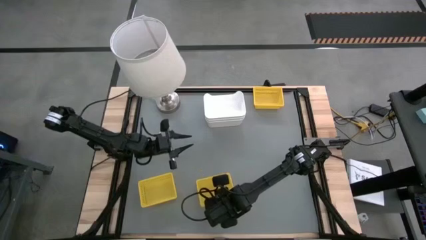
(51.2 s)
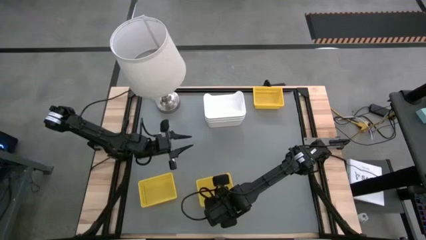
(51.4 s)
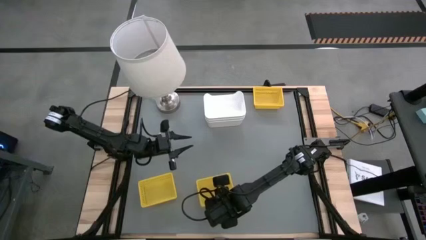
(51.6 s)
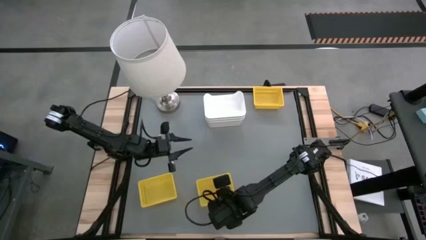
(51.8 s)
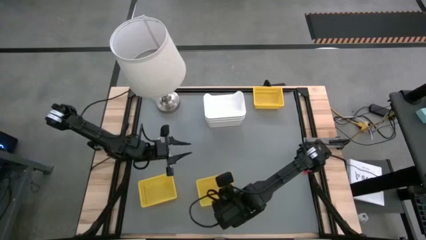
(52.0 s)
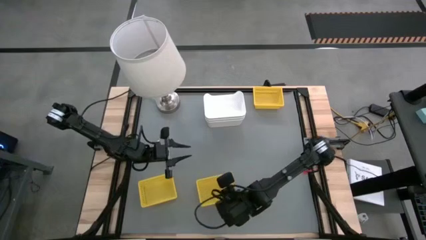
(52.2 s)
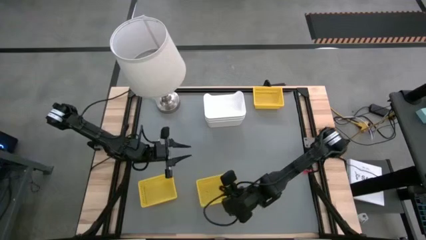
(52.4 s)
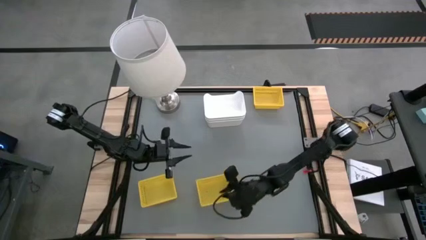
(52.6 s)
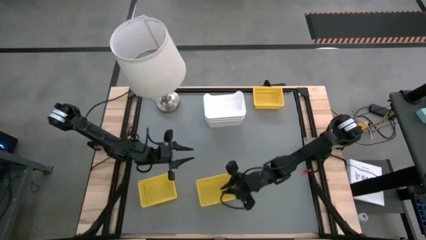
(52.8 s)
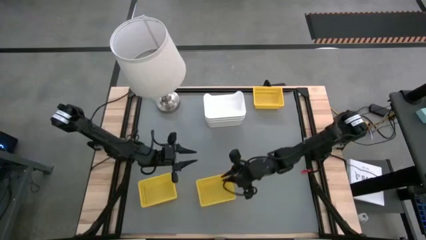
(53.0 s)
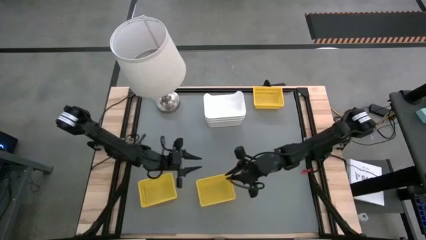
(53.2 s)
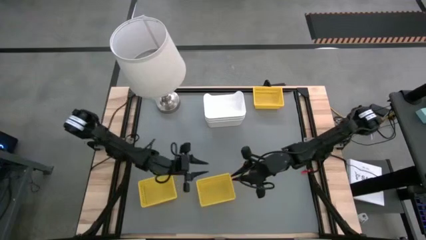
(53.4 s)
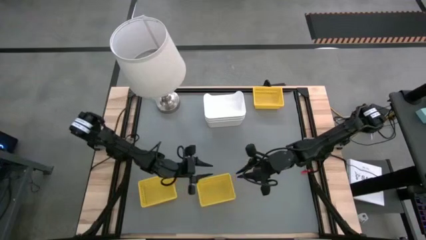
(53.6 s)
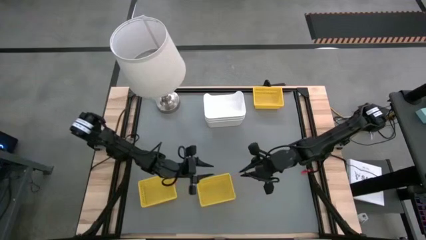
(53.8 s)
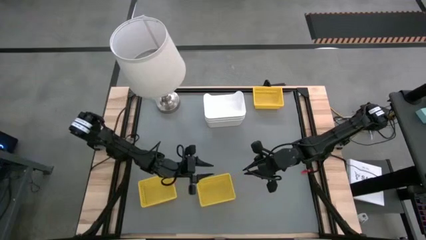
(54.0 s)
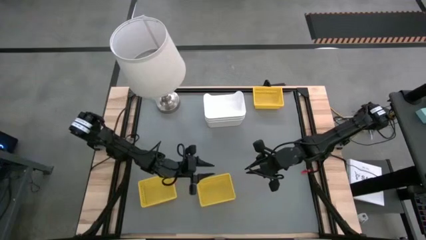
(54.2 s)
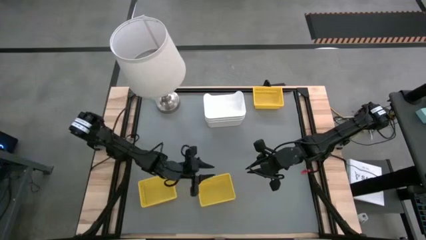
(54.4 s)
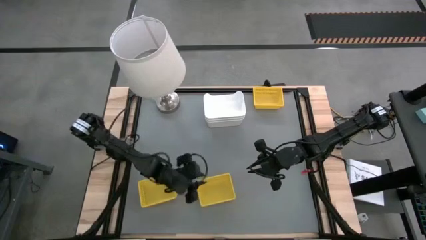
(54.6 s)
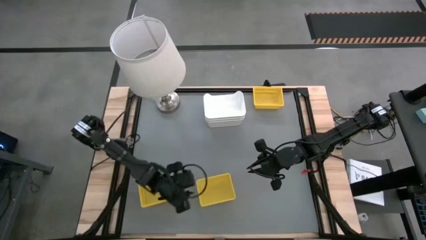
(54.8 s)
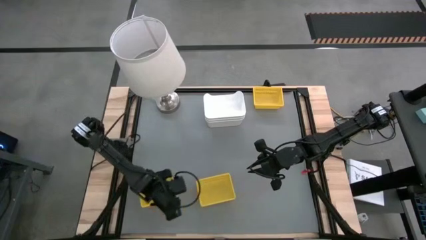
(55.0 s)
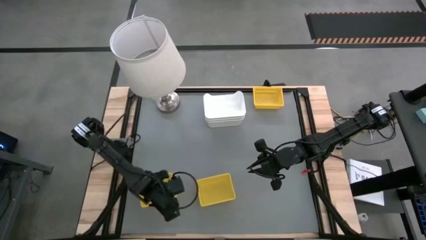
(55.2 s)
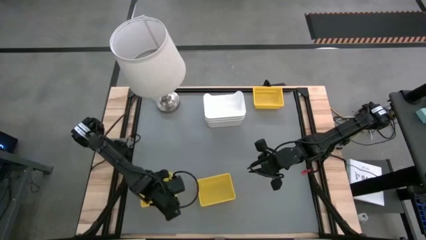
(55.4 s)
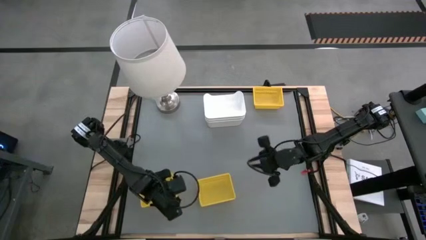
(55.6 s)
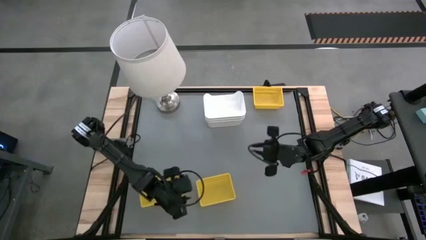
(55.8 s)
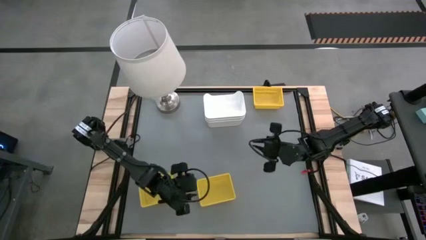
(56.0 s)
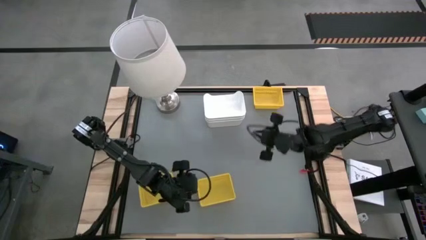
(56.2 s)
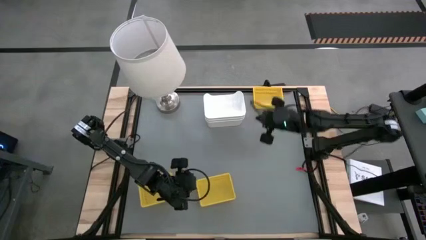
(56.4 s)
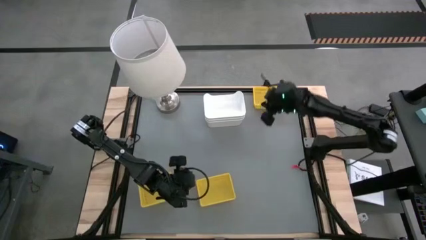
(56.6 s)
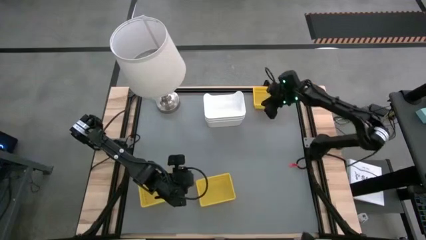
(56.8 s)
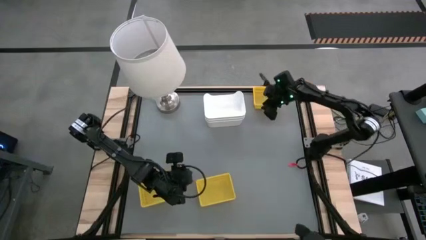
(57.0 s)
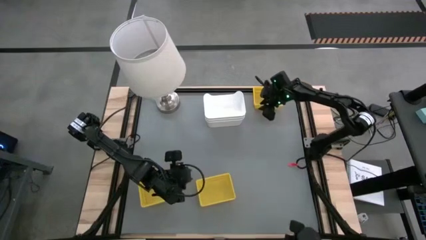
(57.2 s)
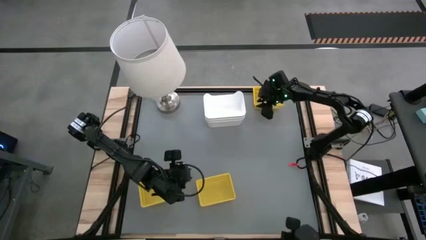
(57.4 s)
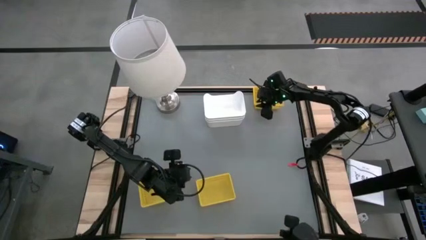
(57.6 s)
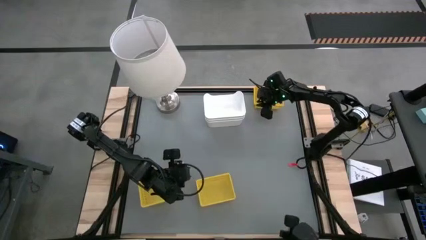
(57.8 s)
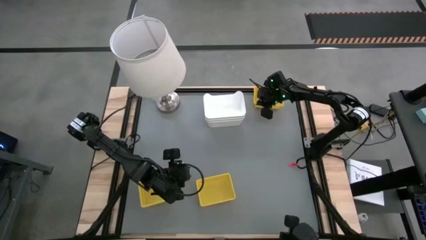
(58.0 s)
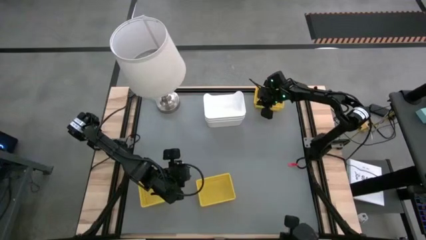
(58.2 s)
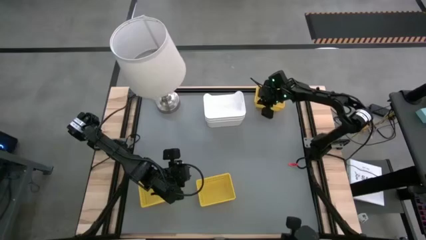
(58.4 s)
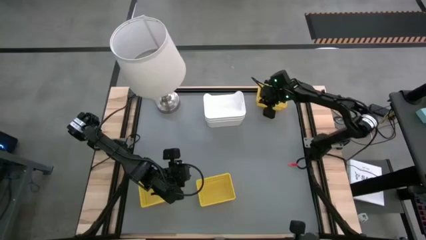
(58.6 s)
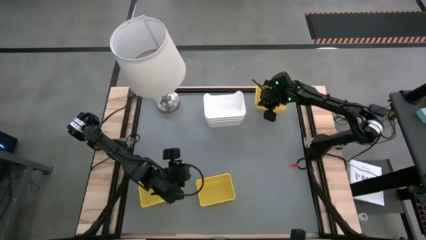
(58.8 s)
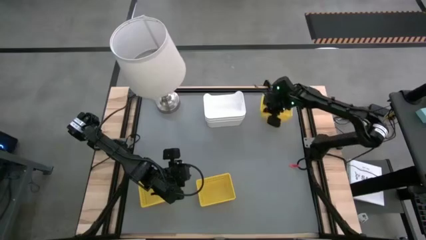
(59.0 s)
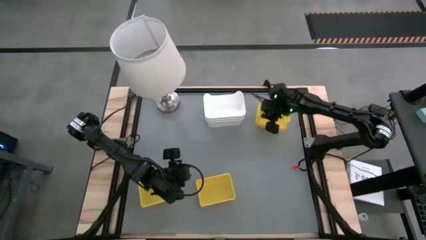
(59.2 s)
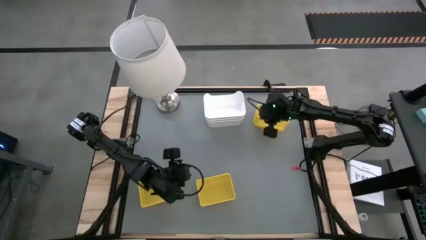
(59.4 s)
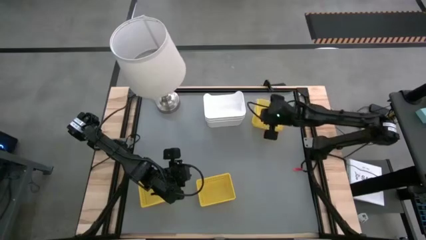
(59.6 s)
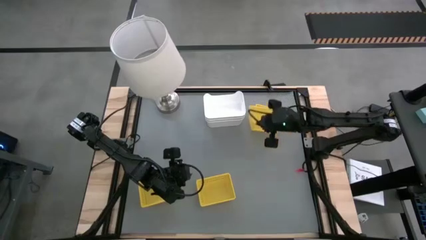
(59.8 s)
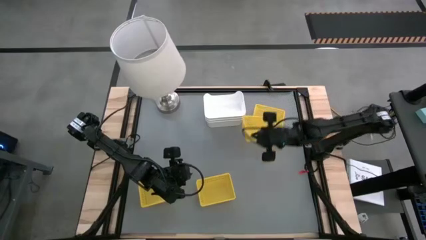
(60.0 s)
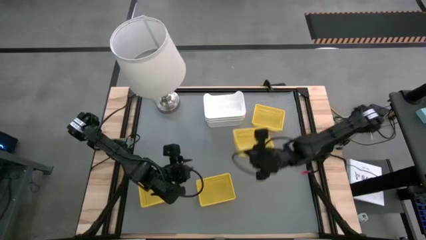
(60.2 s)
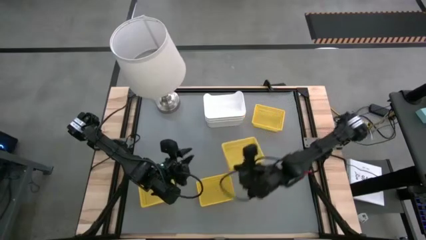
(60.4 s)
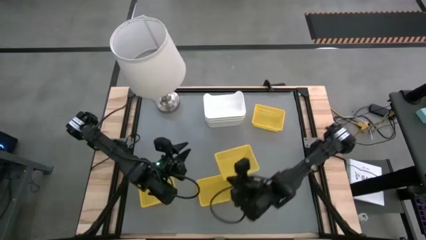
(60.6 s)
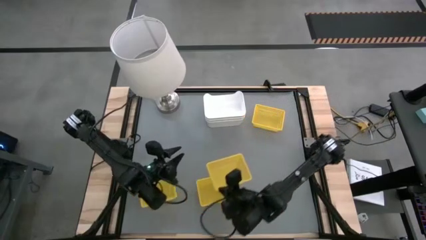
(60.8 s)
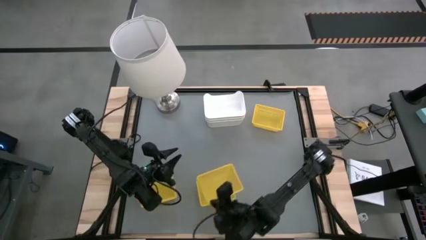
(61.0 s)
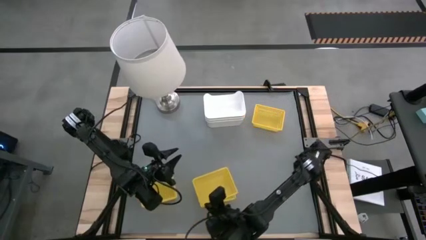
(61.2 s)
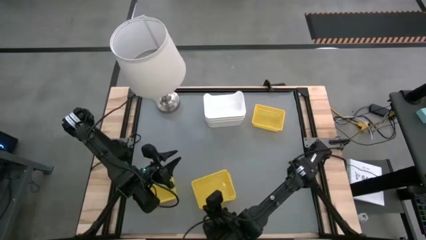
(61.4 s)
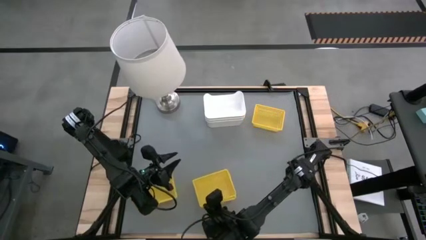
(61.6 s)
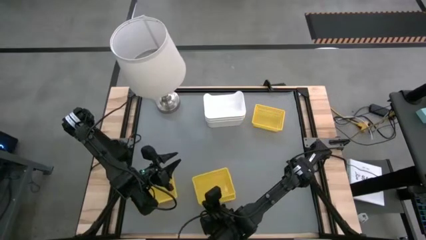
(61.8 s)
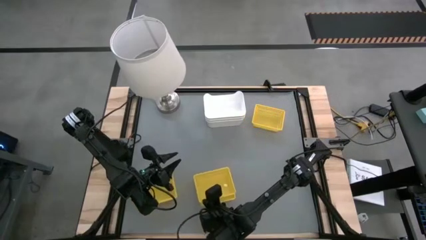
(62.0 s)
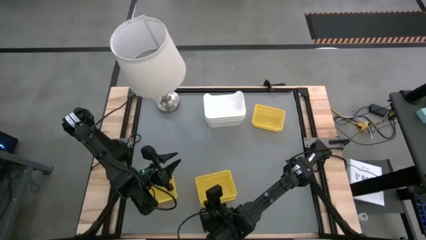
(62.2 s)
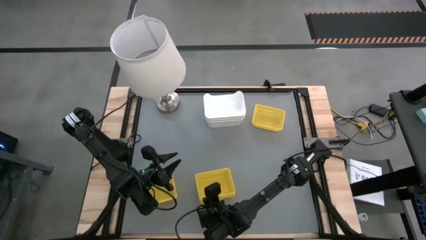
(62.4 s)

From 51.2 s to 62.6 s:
Stack the yellow basket on the stacked yellow baskets

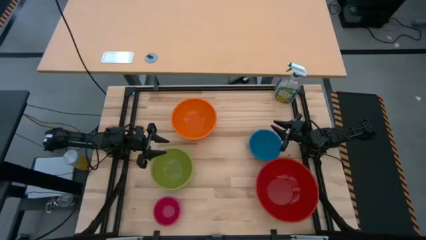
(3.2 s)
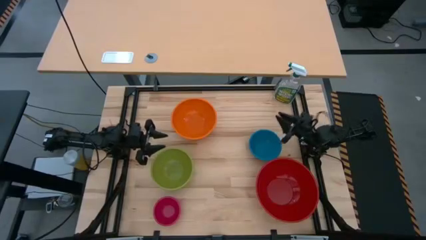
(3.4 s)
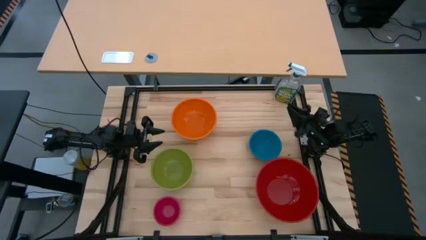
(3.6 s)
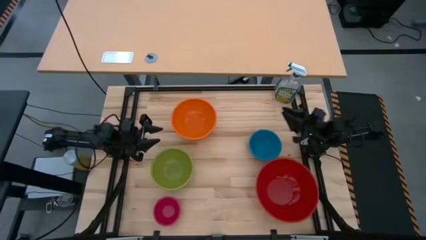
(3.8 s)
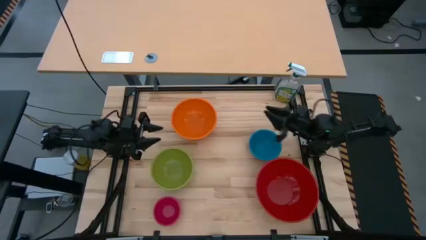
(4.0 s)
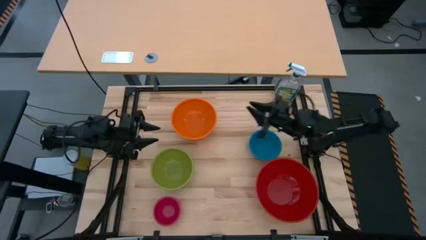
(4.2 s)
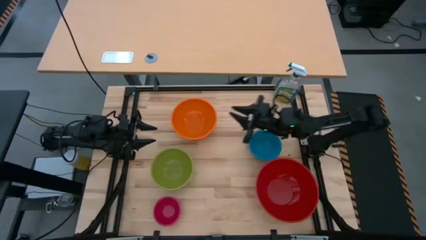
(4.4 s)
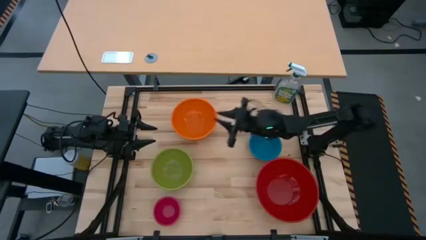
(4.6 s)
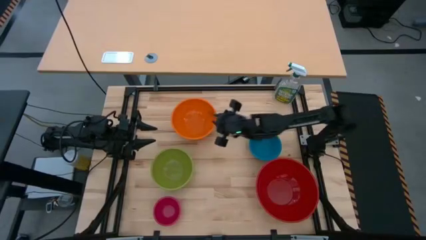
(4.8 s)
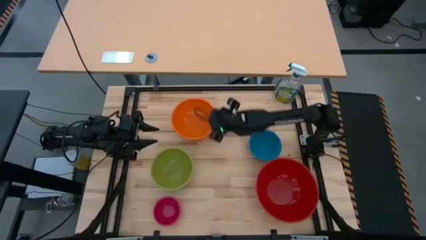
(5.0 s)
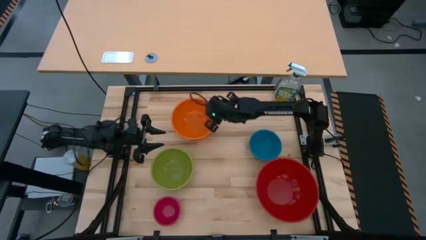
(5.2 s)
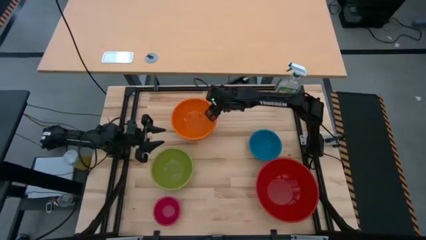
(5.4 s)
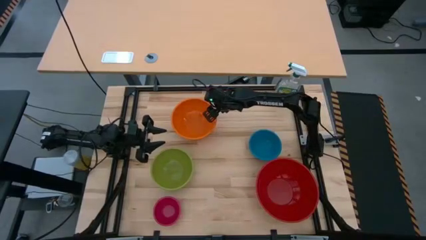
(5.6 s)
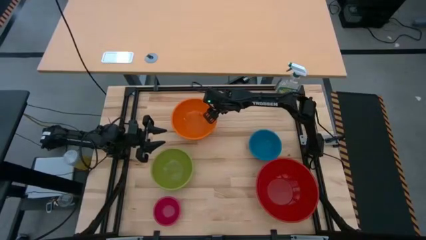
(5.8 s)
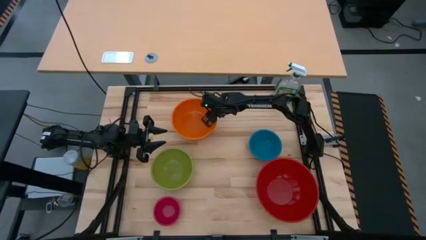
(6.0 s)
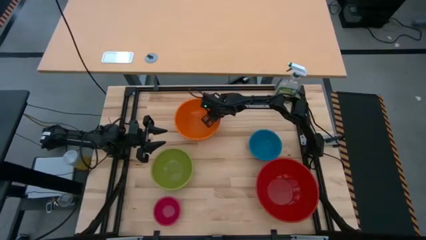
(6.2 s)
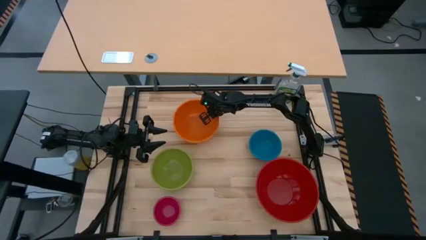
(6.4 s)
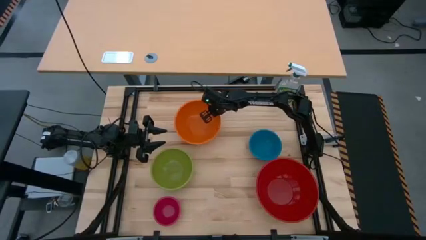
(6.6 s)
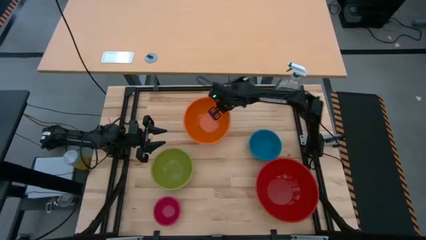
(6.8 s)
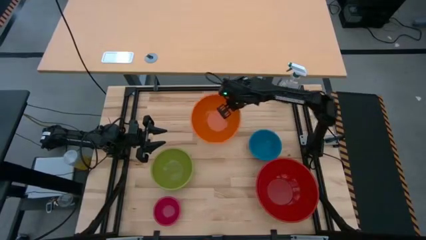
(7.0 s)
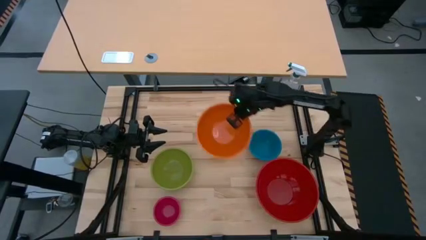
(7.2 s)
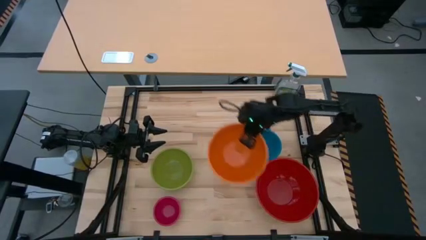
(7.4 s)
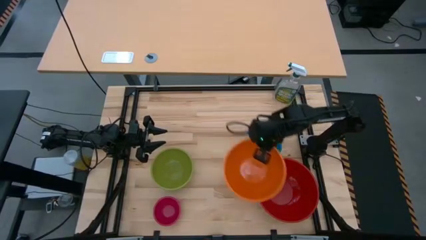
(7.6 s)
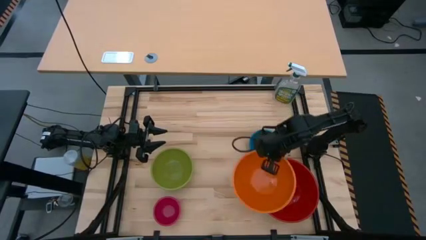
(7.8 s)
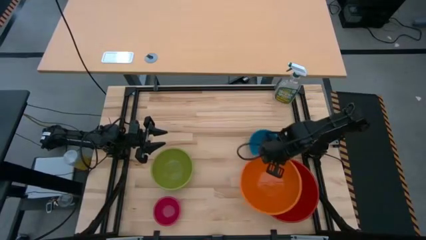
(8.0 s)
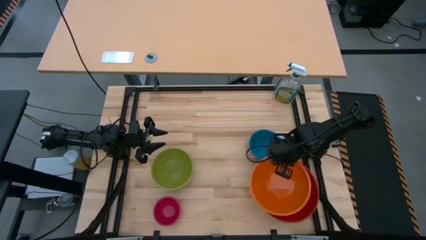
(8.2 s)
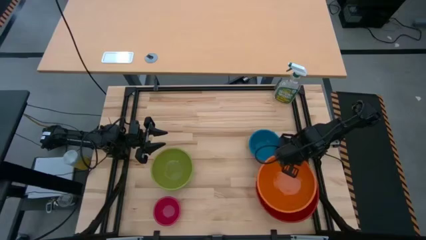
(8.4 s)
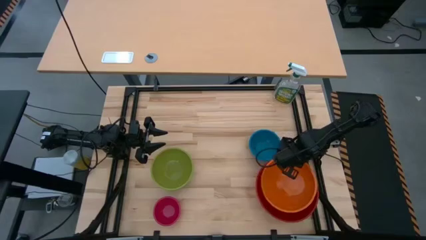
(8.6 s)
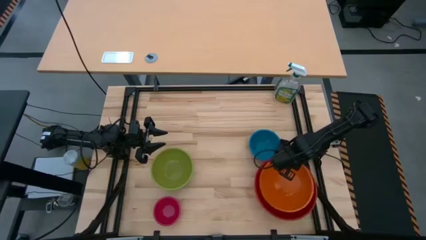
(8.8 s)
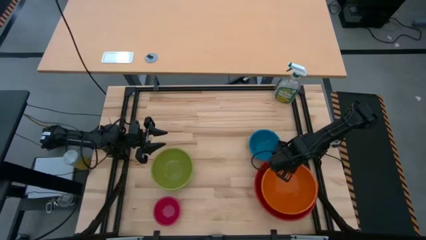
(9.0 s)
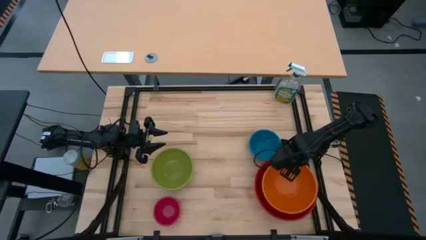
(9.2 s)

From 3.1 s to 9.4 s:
Stack the orange bowl on top of the right red bowl
